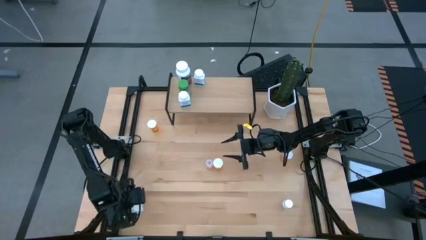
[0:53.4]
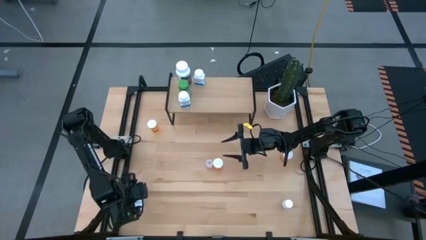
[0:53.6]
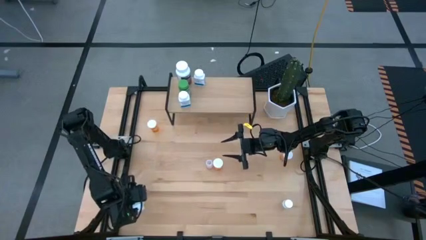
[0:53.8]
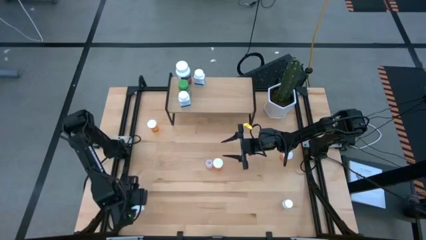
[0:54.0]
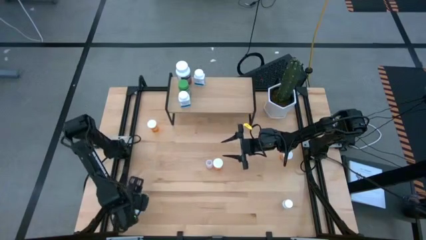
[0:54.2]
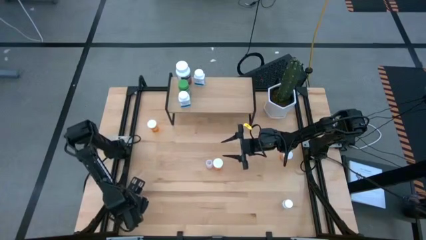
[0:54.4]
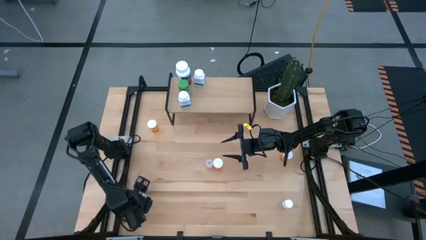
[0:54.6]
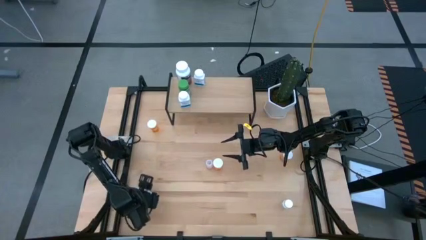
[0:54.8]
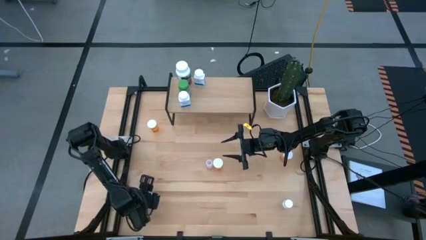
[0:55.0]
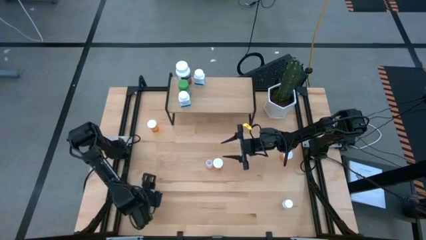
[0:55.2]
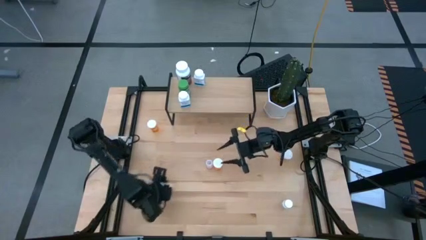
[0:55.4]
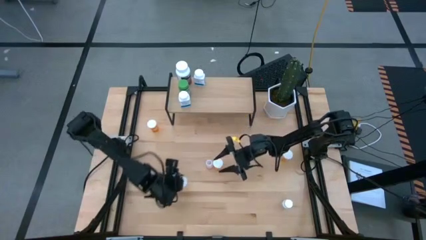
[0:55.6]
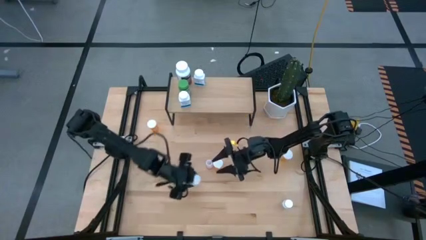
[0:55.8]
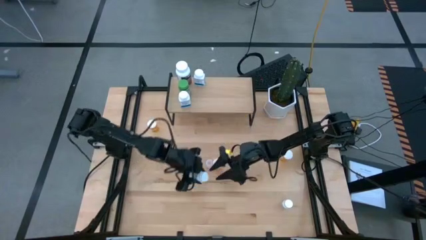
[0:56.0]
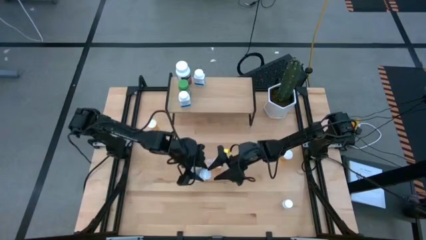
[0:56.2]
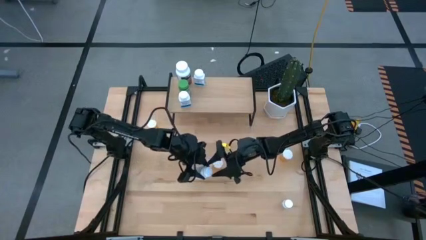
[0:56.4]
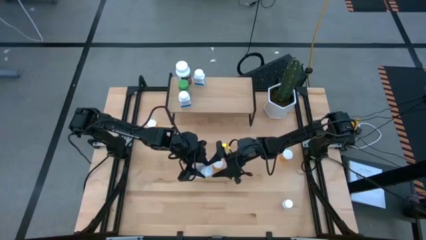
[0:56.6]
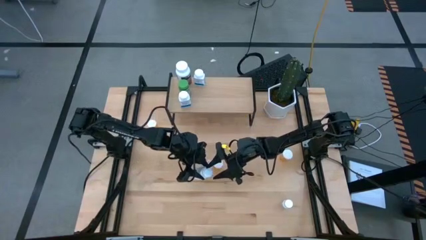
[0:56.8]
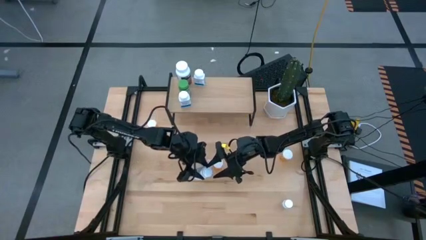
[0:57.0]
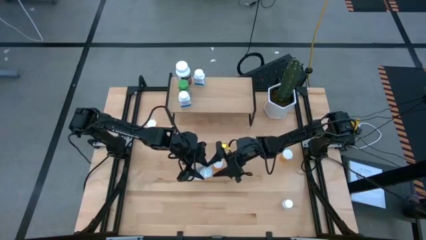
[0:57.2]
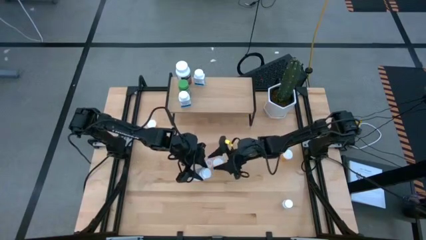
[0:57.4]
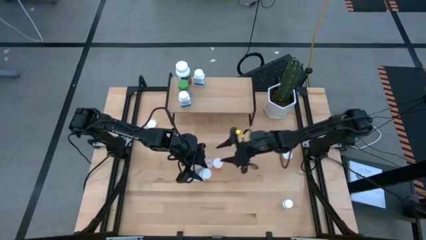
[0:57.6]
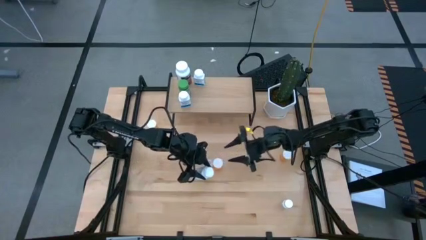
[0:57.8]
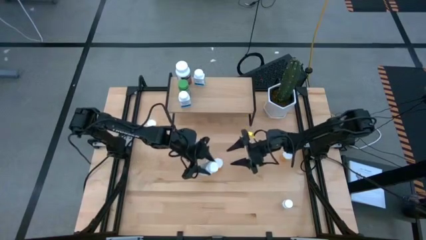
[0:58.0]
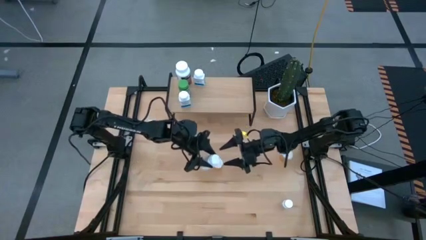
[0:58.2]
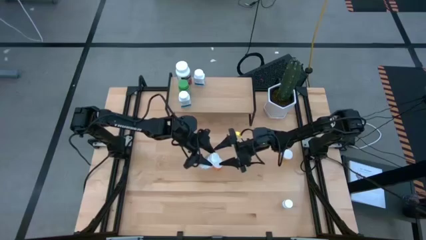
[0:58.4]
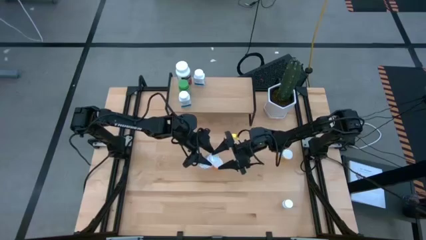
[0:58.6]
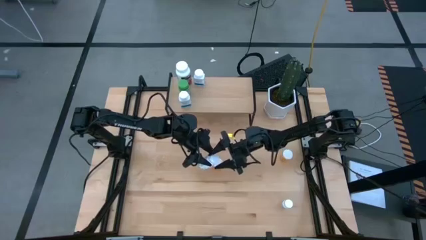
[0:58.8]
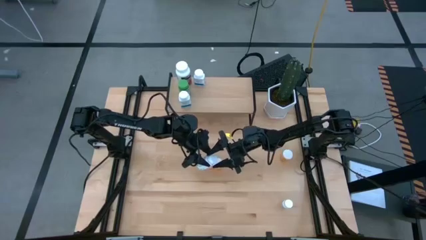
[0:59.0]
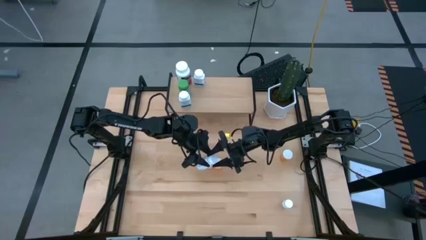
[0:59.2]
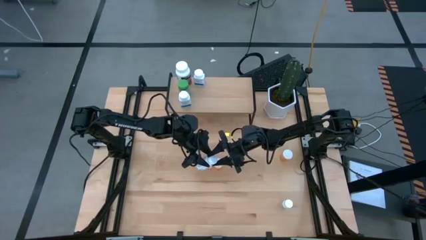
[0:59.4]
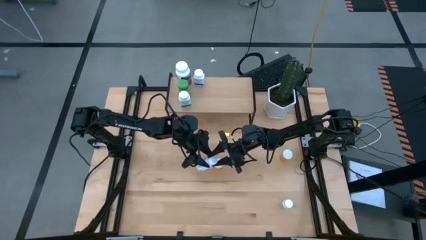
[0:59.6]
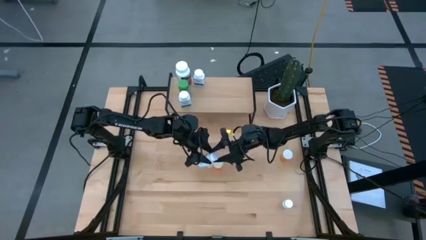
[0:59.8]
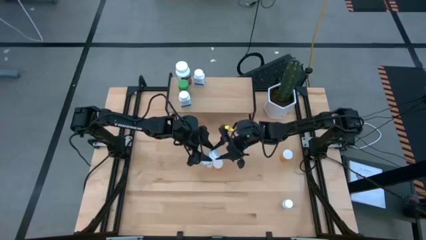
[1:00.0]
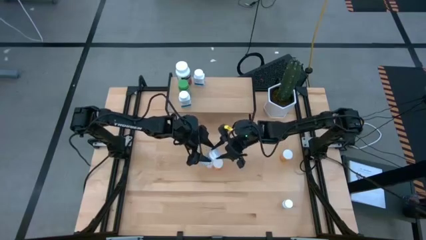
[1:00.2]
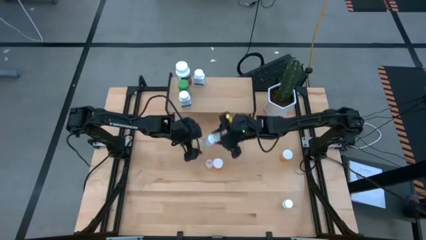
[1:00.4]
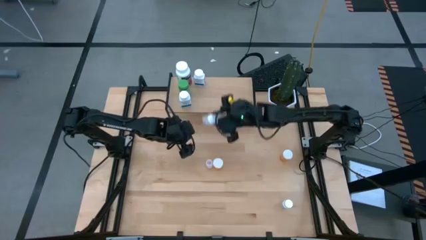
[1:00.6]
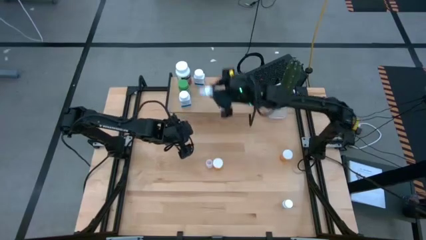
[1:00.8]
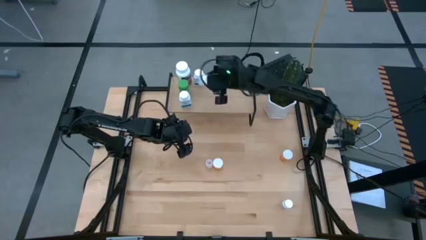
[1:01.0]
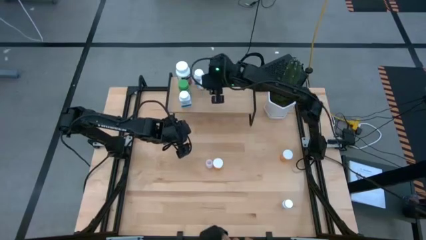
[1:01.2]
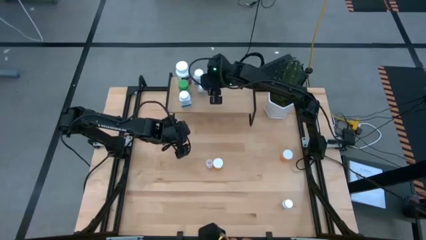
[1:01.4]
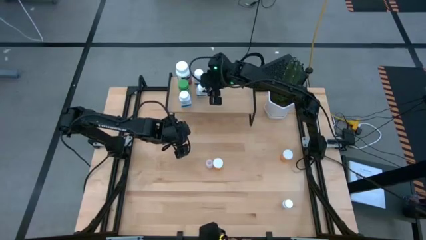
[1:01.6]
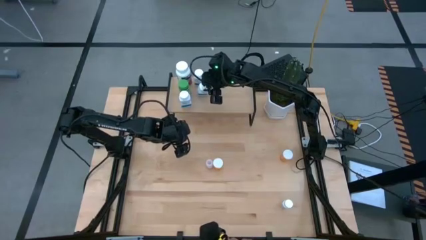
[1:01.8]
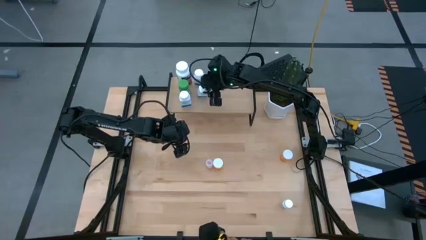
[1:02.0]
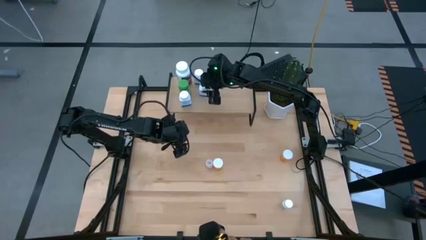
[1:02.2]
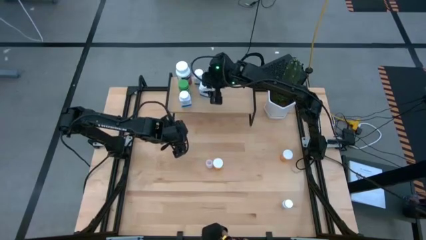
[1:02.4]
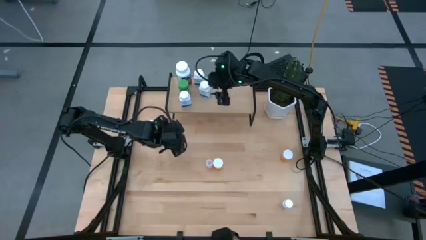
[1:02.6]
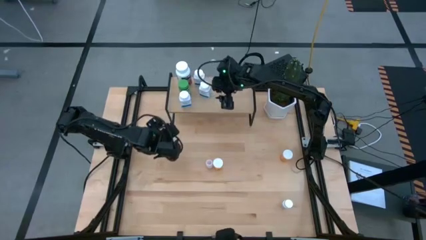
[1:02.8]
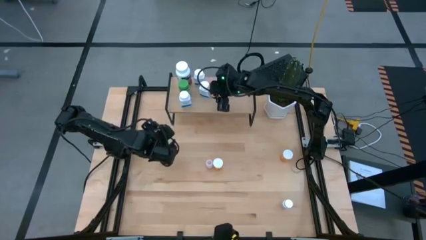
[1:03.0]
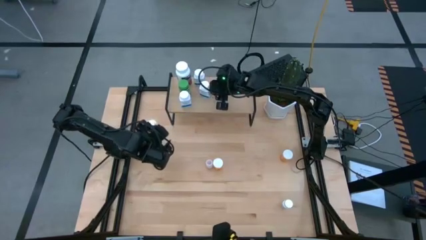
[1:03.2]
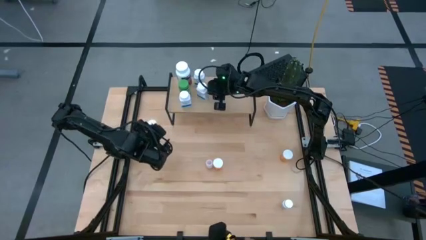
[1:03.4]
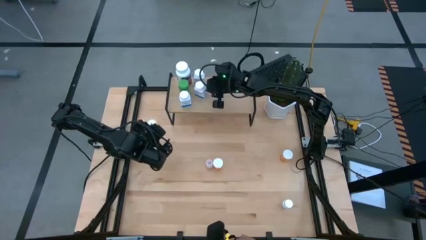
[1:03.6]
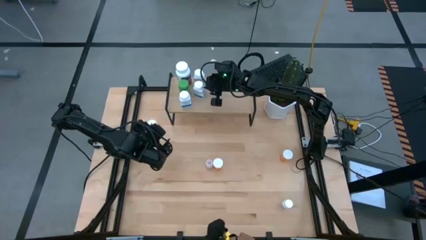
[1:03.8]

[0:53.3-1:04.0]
Task: Pick and place medicine bottles onto shelf by color
Put the white blue pill bottle on the shelf aligned with the other white blue pill bottle to the right
